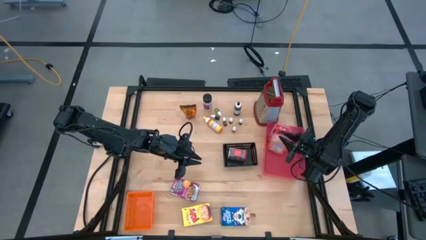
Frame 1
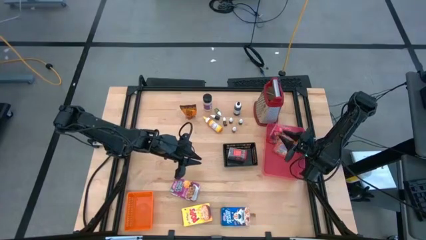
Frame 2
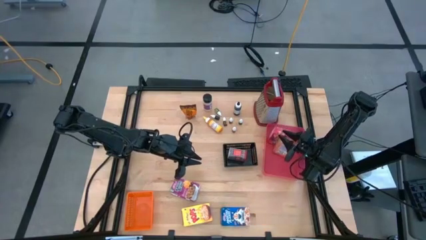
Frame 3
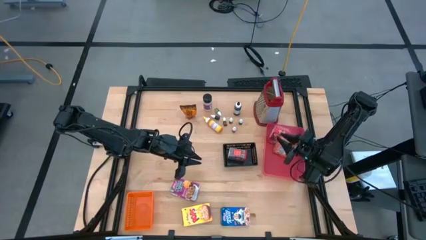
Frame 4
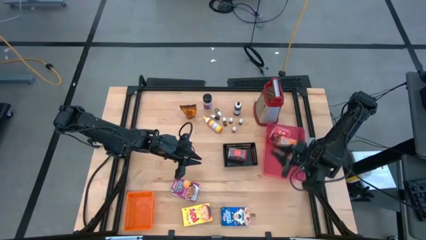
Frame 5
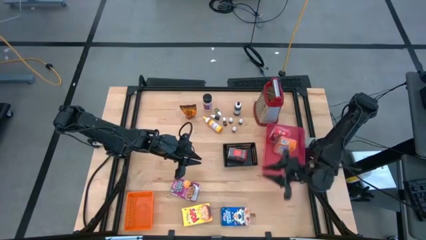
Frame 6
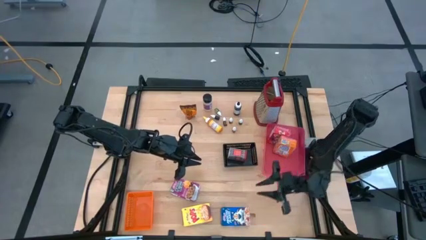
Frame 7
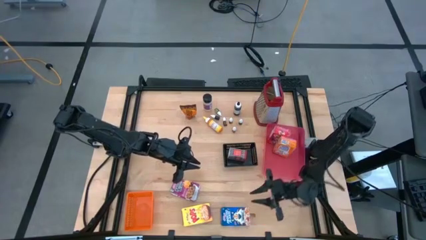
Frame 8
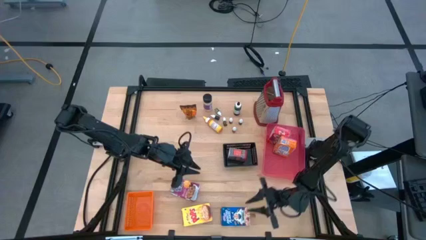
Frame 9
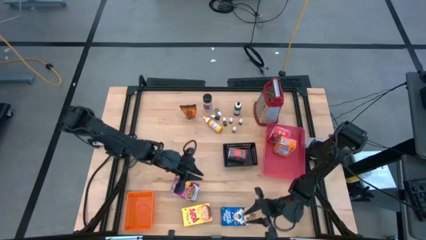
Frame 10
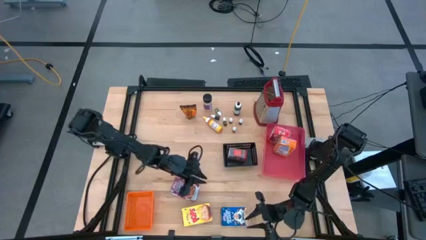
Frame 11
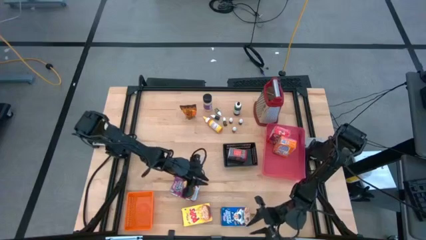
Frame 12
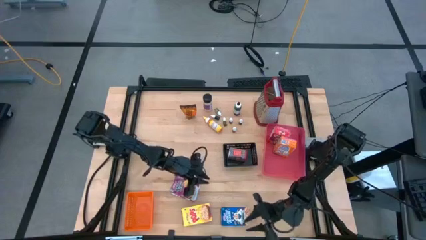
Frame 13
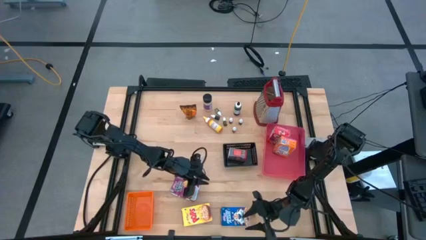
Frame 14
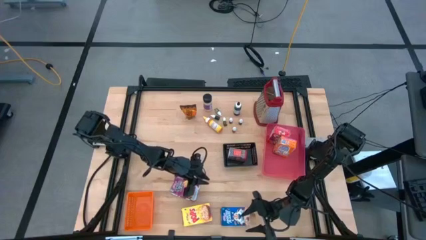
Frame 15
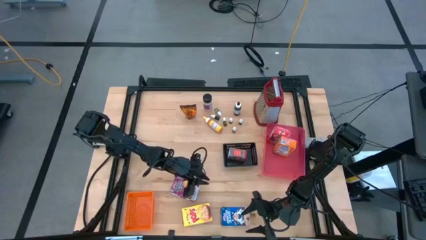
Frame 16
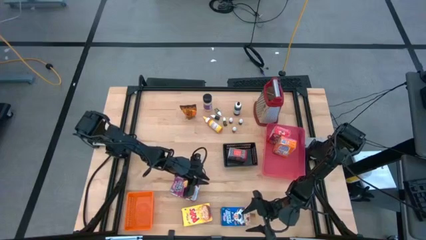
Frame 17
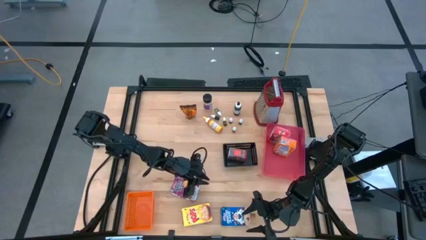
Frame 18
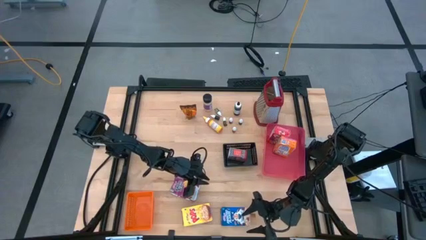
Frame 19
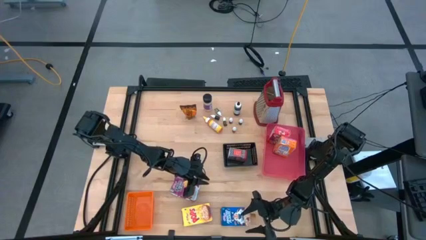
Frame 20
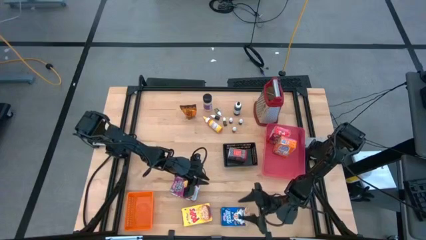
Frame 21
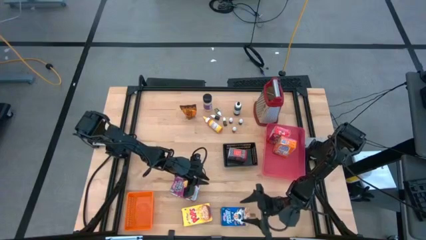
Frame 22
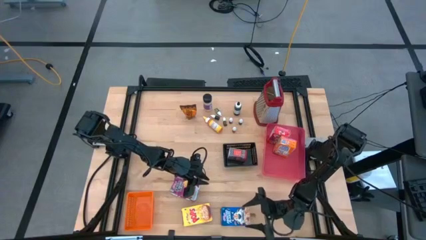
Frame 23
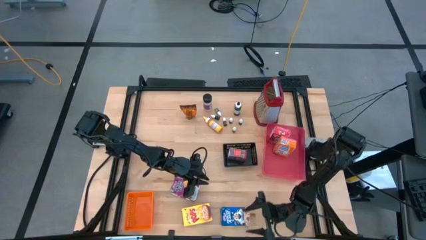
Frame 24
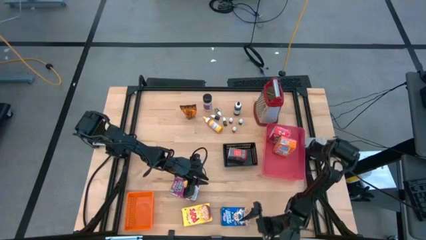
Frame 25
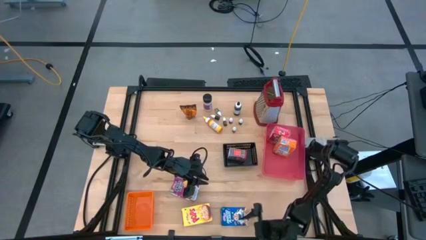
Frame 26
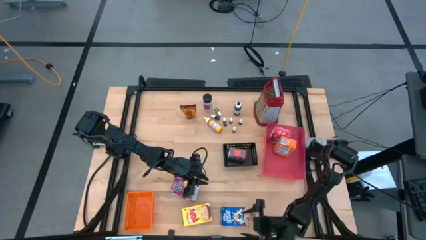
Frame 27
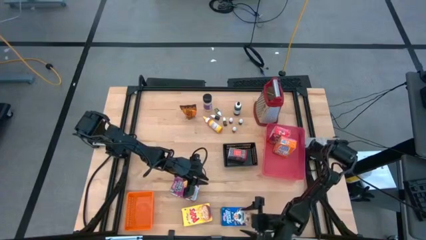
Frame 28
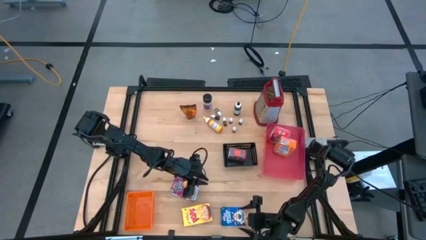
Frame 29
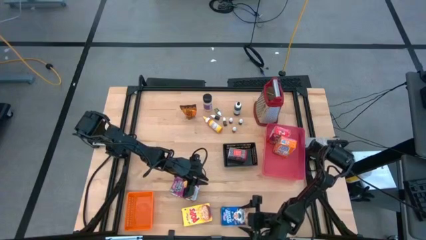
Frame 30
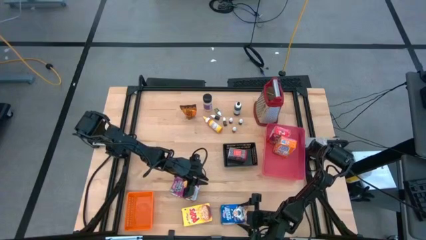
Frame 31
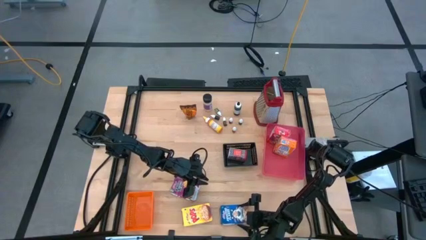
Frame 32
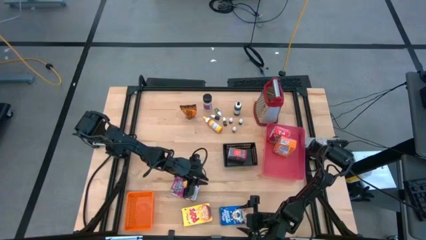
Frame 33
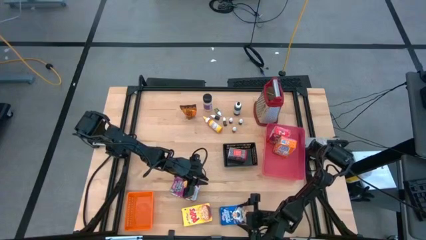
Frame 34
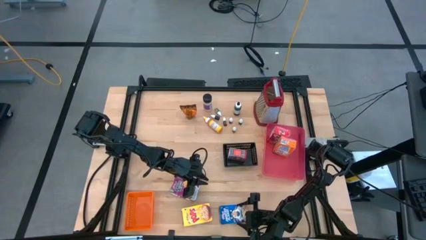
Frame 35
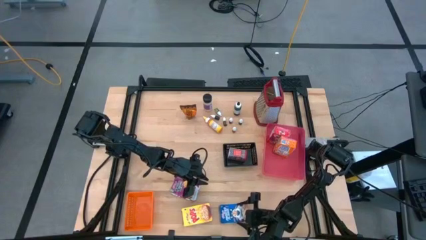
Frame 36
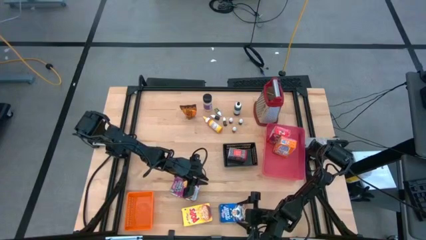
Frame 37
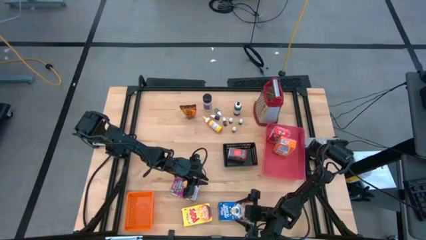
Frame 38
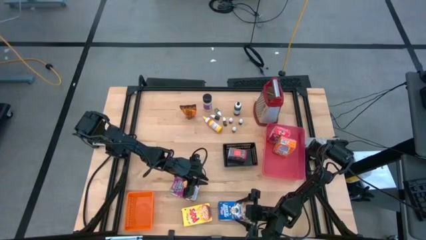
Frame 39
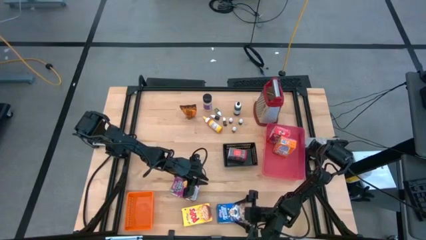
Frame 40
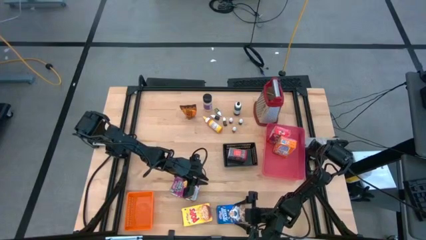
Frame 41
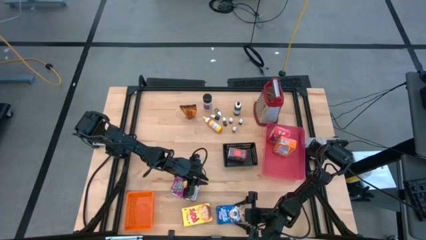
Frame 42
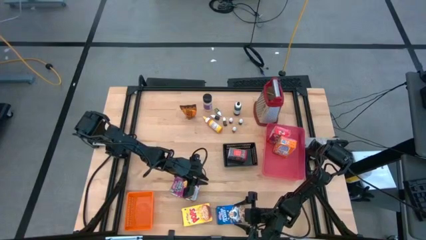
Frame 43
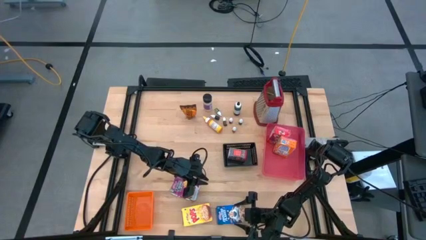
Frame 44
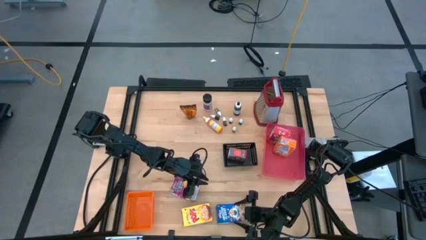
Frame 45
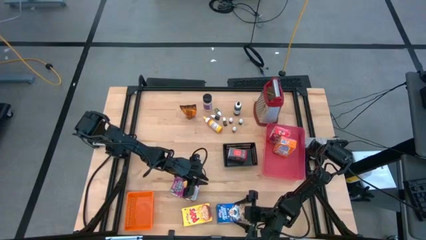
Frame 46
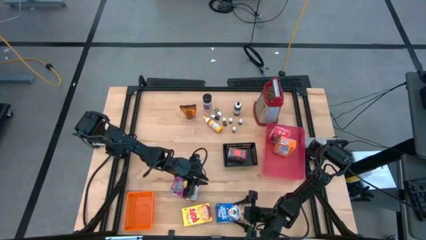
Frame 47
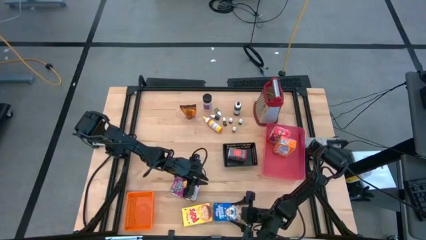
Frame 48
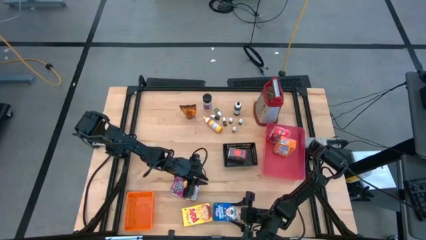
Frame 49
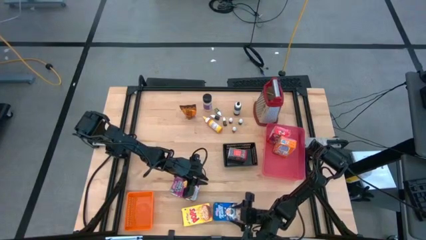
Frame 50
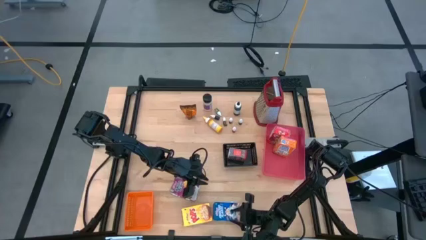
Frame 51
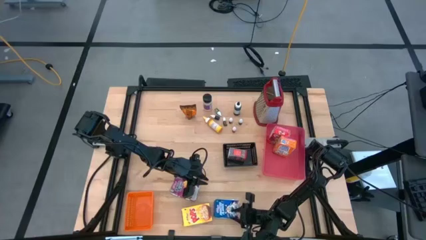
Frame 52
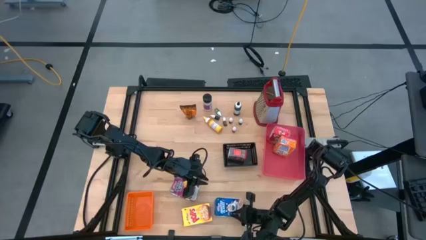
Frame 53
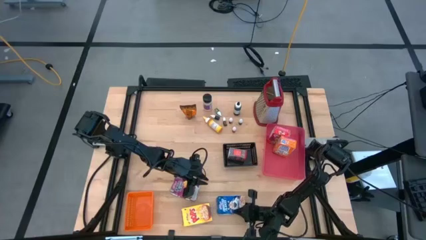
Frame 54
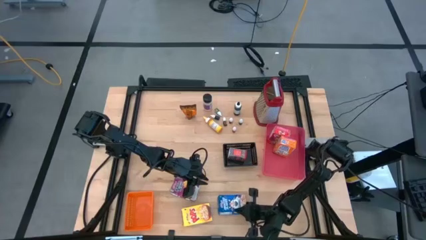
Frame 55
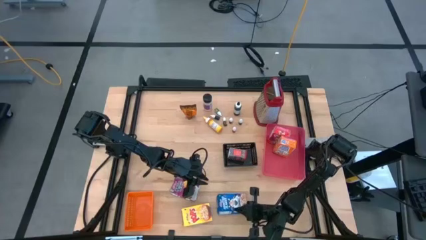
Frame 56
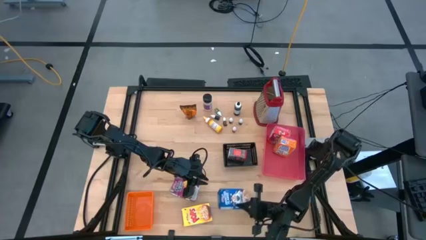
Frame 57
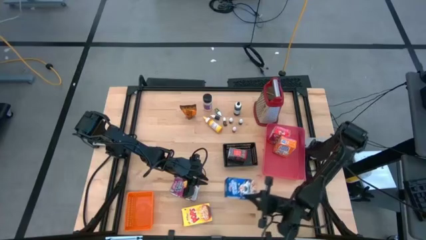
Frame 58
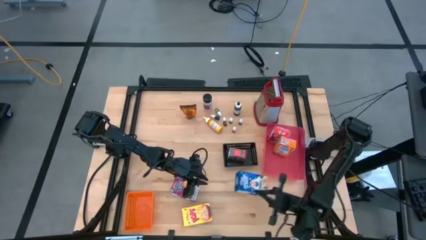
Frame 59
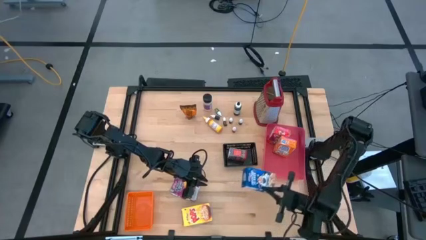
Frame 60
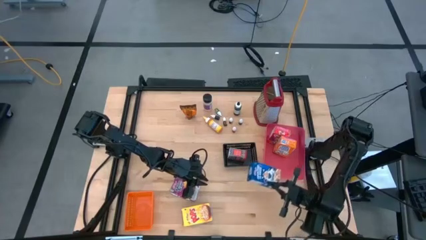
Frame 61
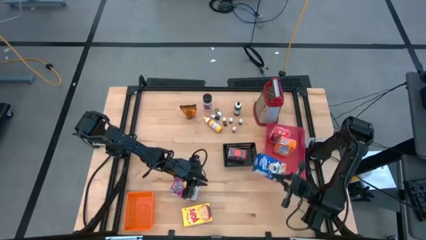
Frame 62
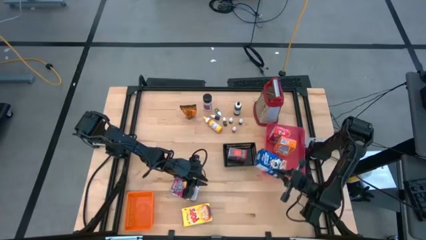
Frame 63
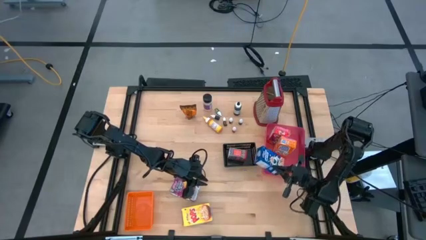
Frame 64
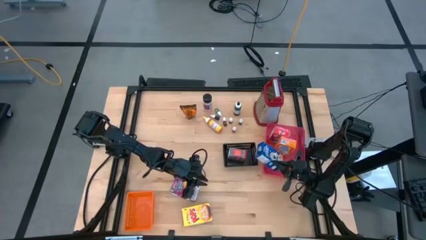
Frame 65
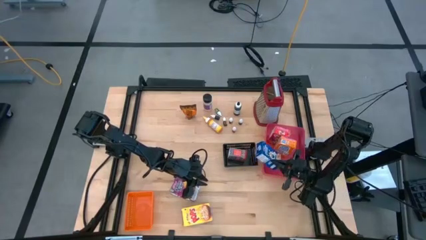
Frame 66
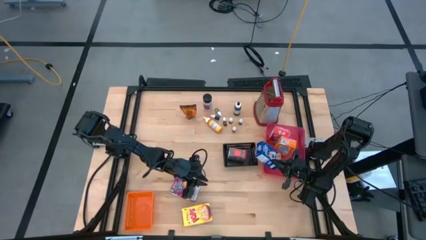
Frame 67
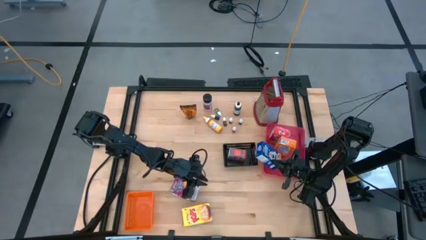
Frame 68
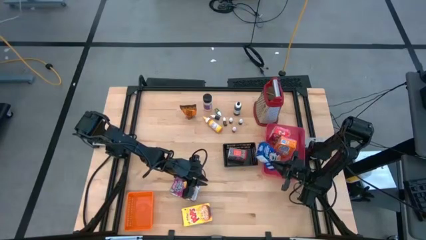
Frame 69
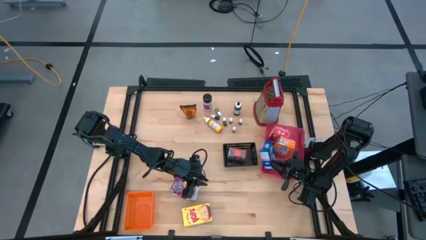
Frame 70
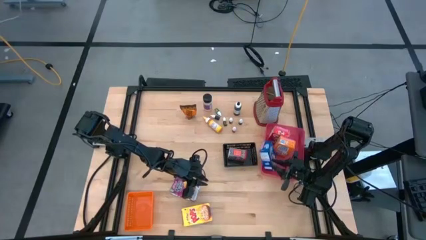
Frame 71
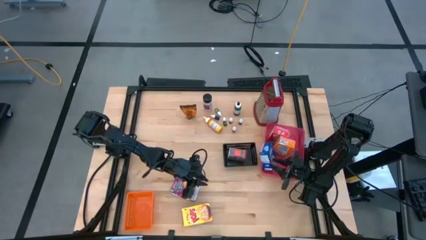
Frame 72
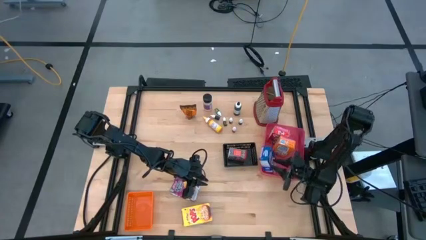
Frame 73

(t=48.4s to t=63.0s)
Task: Pick & Place Kitchen Items
Put the blue cereal box into the red bin

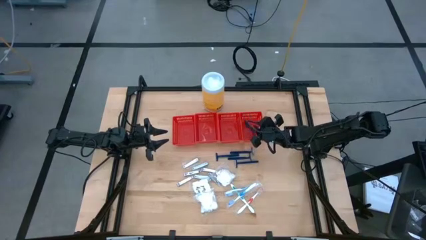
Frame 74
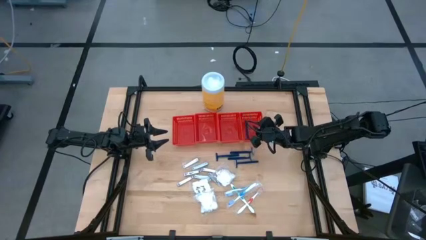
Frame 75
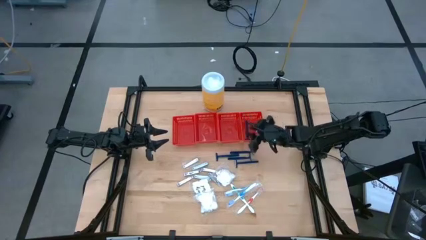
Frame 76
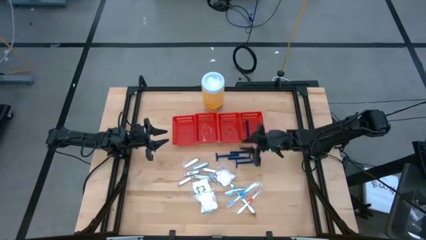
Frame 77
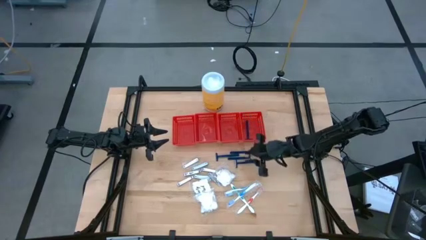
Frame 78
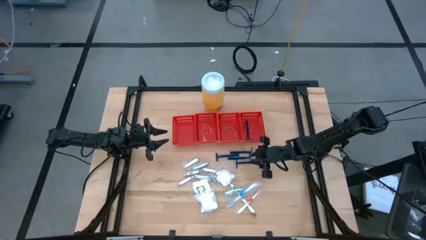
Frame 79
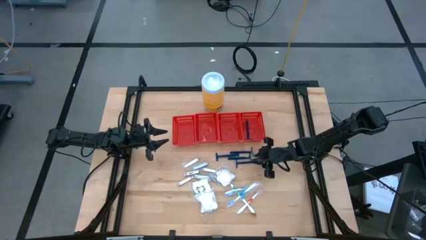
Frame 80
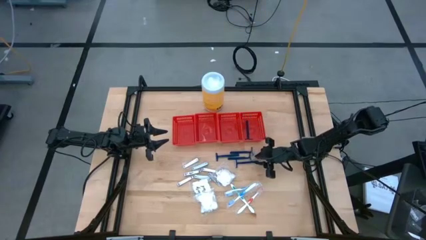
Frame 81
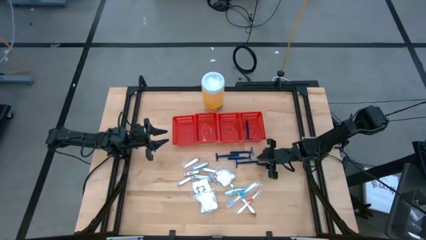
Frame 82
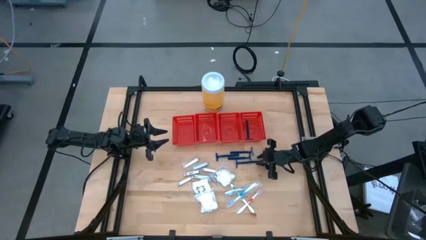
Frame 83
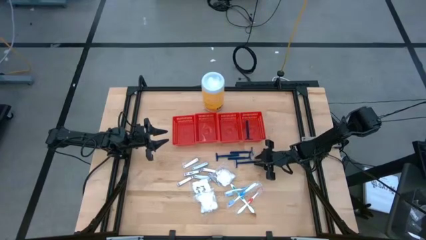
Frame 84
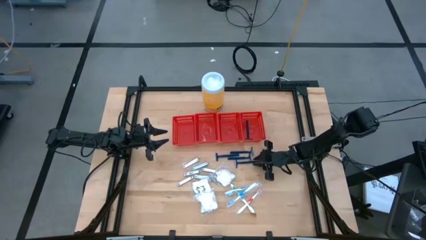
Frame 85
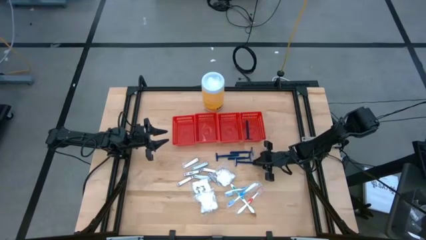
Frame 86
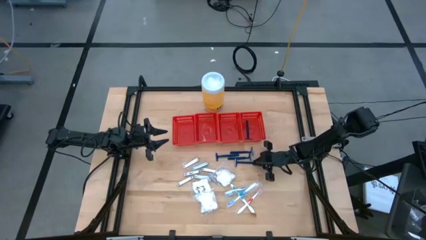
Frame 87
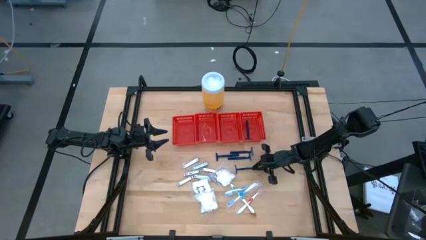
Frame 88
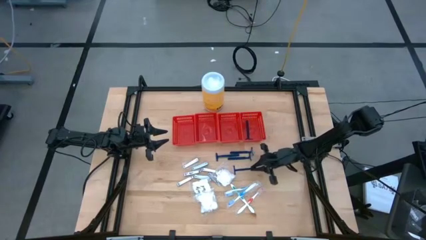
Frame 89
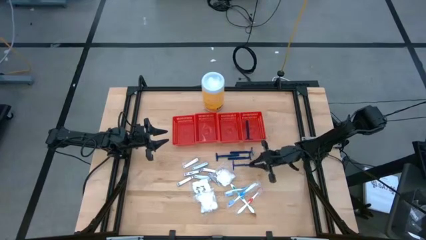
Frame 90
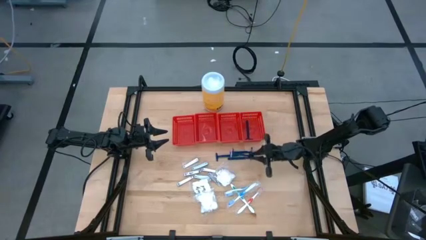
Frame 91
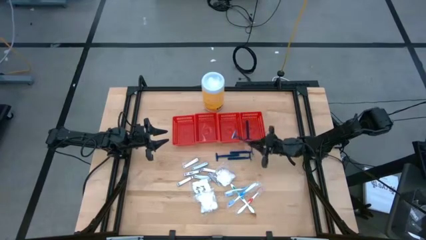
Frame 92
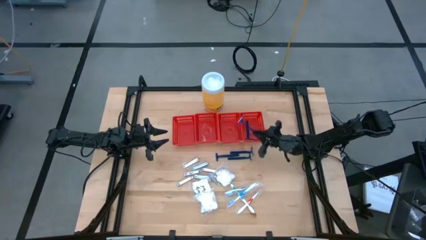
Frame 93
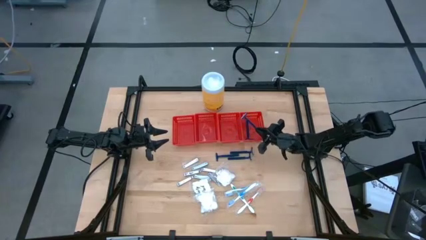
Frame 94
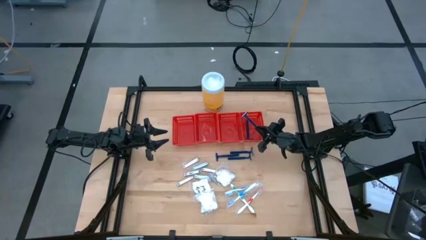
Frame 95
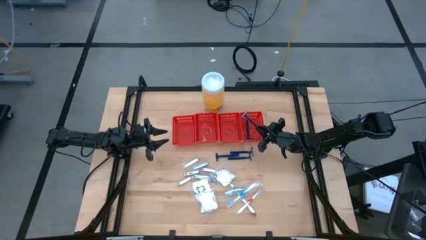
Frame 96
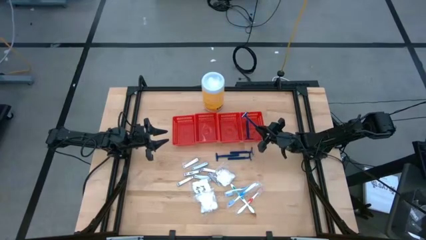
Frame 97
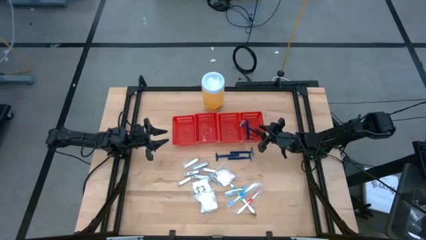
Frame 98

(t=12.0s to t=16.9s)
Task: Pick & Place Travel size toiletries
Put the blue razor into the right red basket
